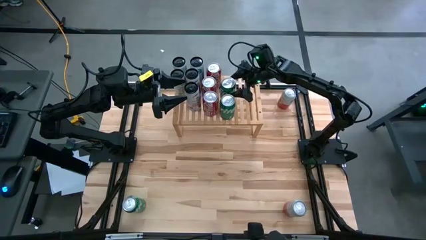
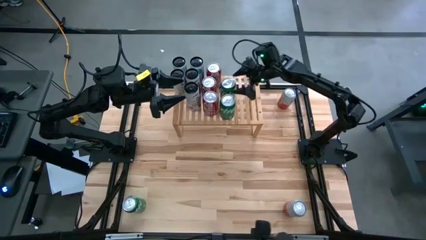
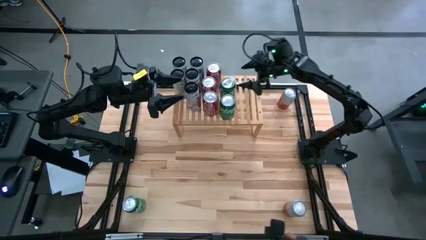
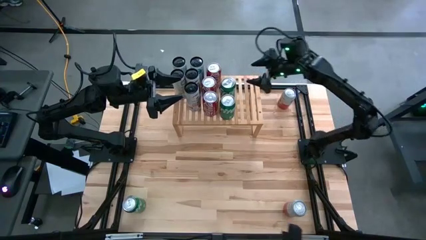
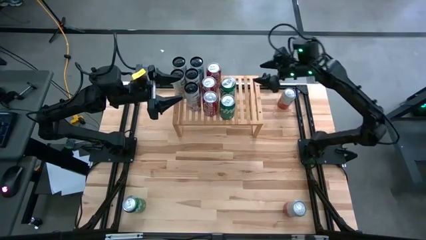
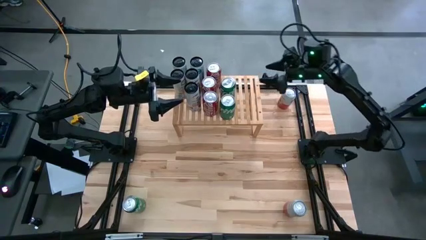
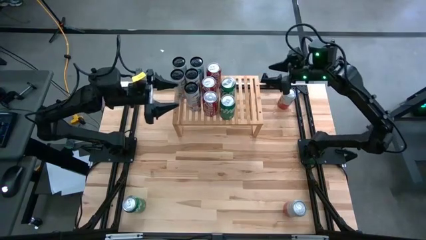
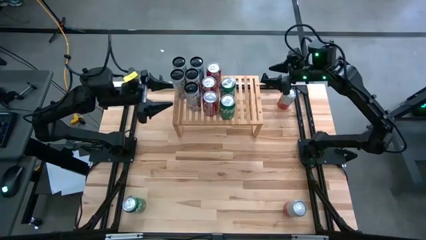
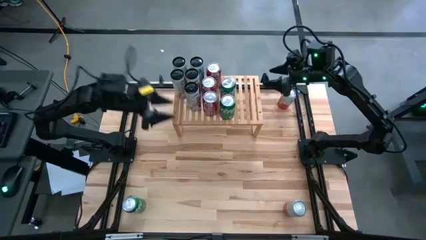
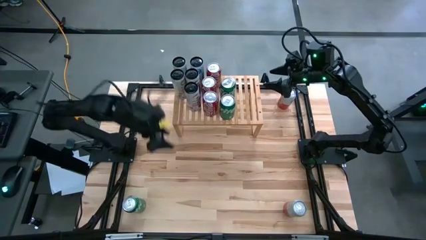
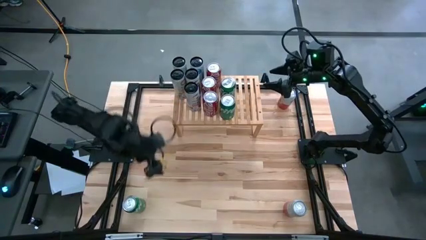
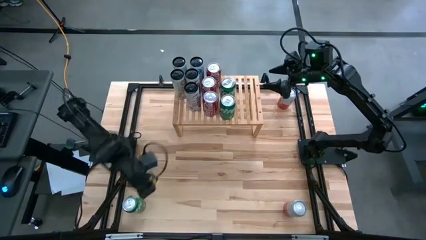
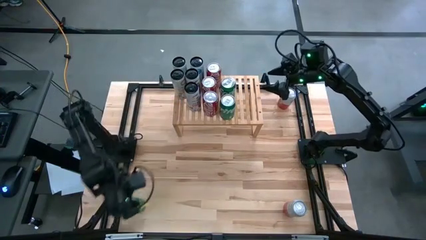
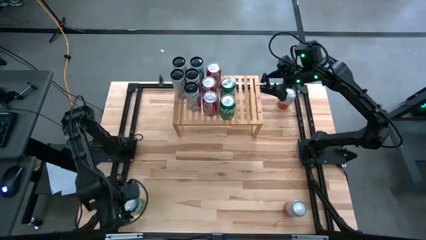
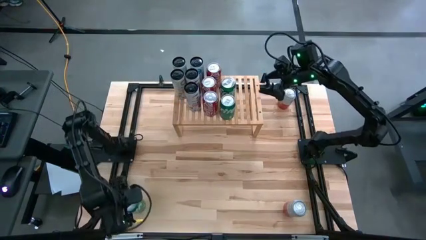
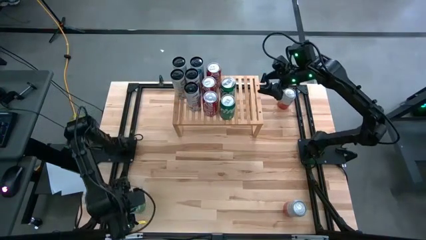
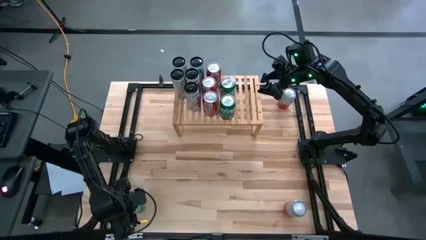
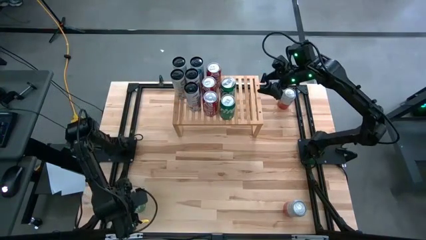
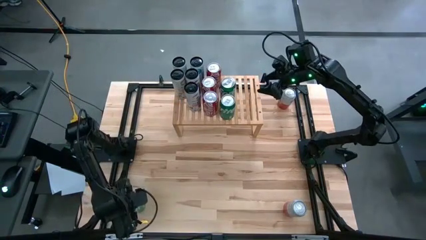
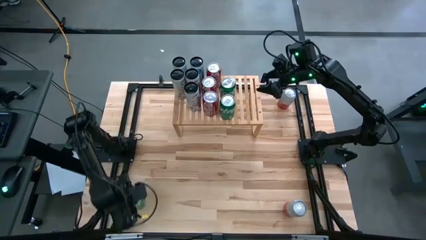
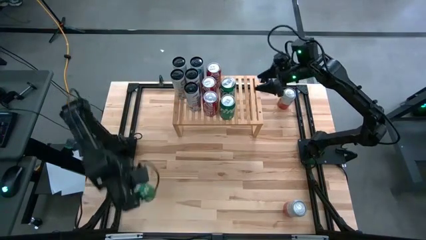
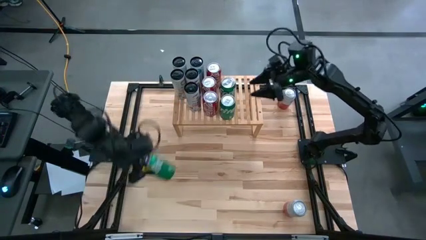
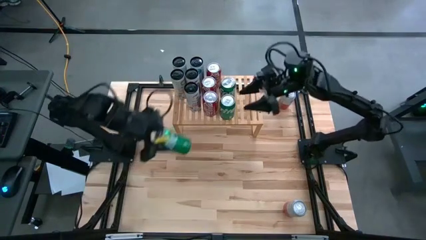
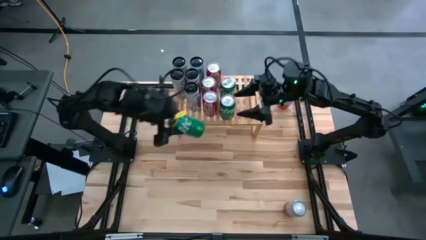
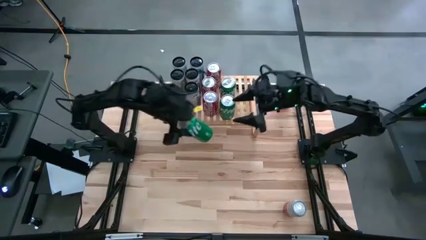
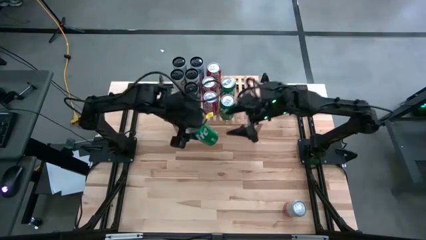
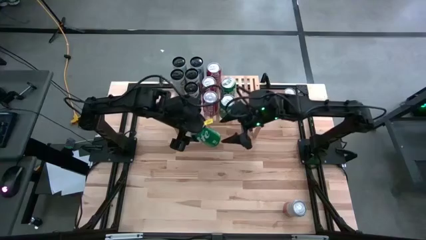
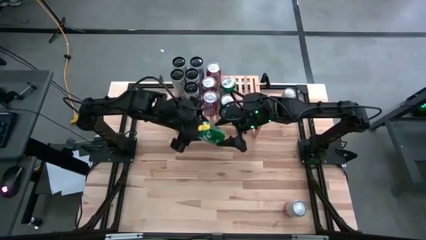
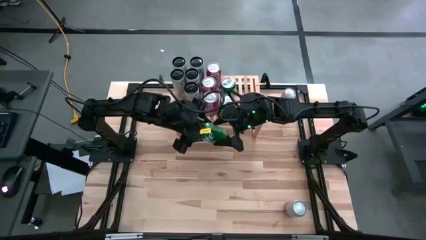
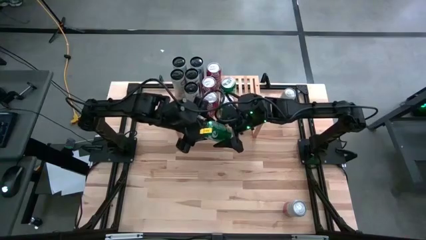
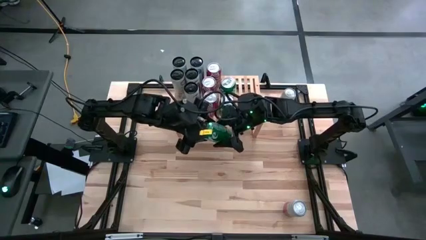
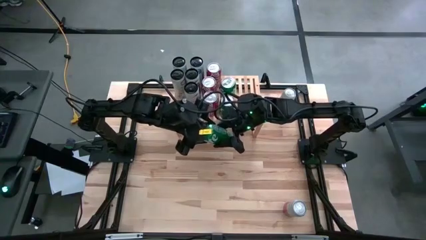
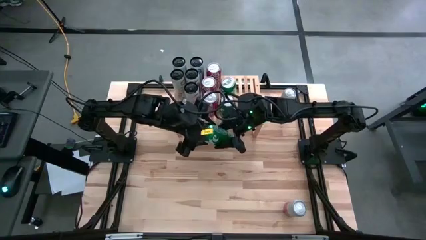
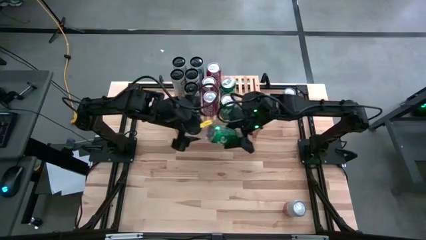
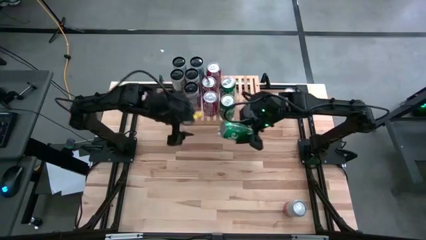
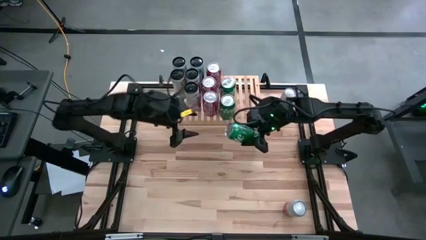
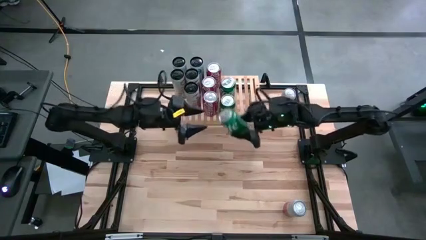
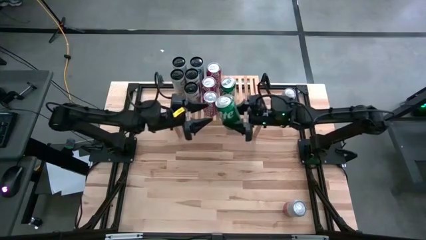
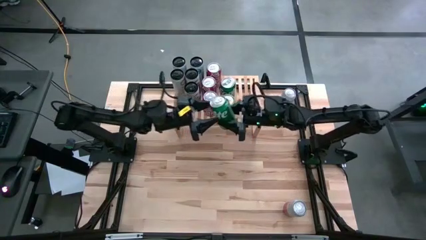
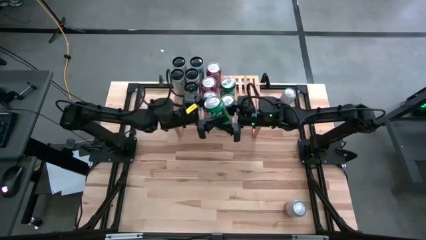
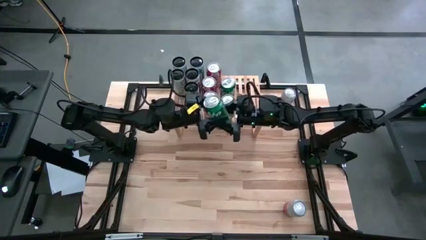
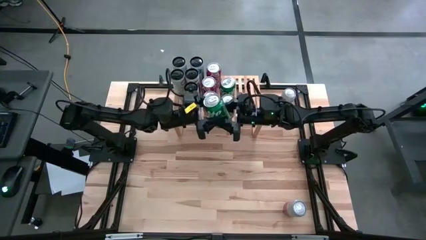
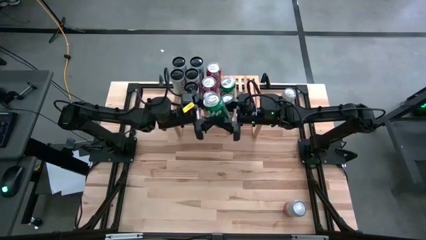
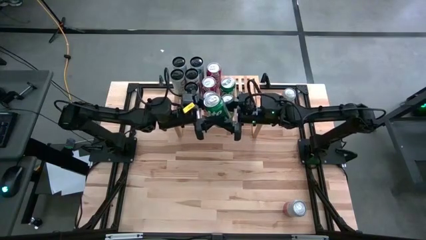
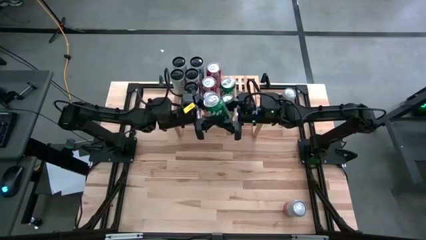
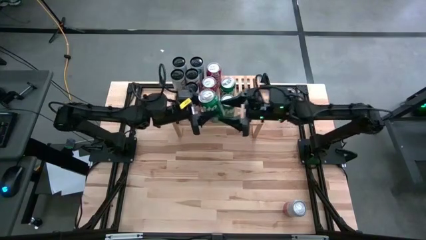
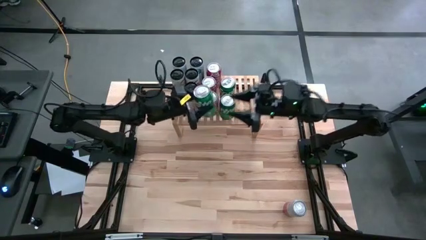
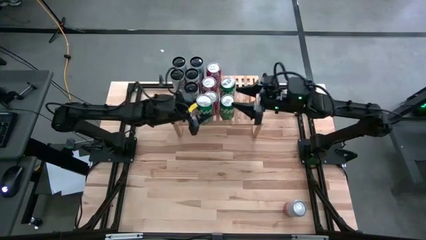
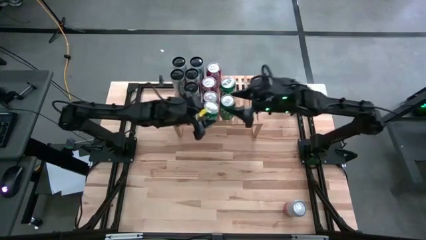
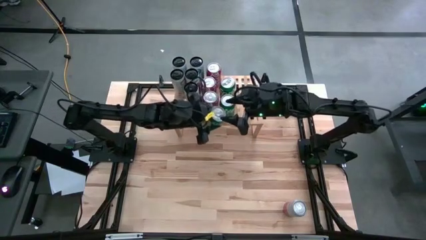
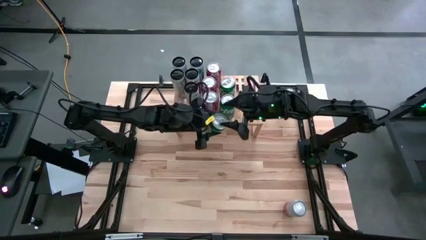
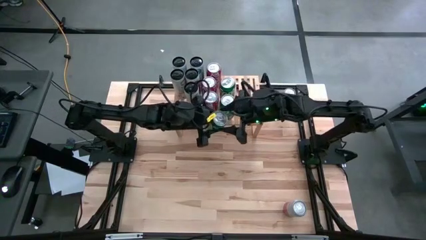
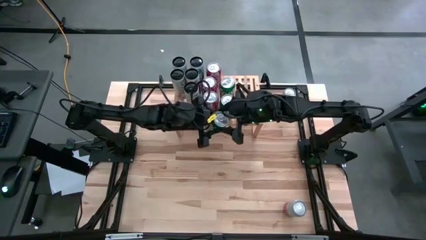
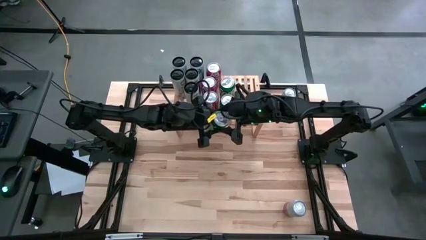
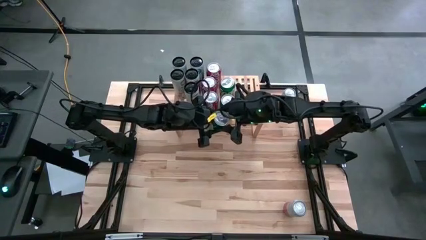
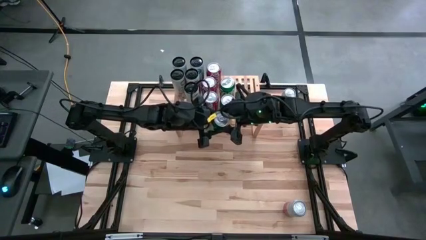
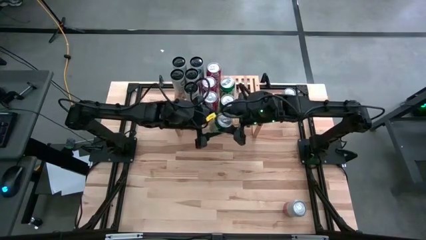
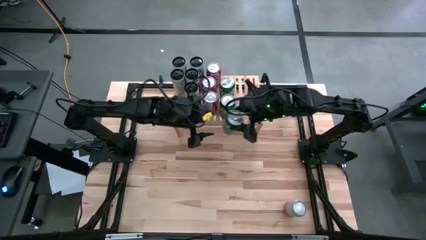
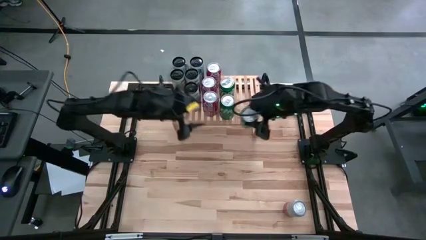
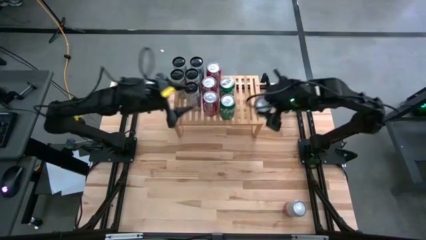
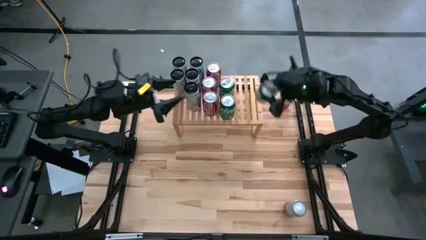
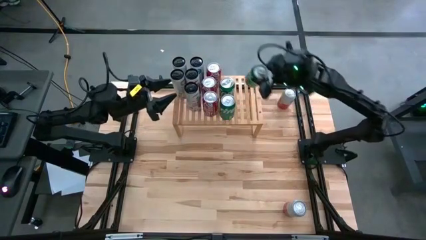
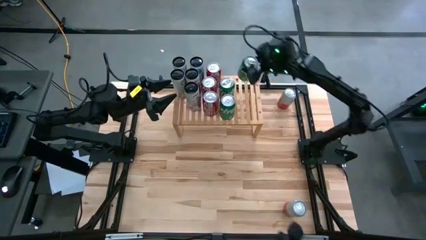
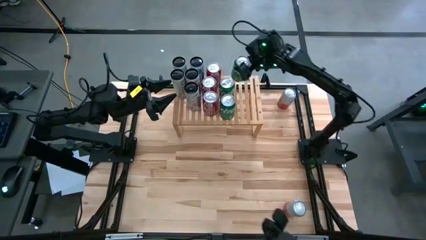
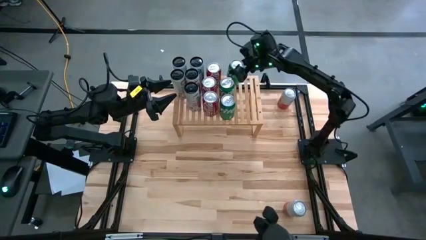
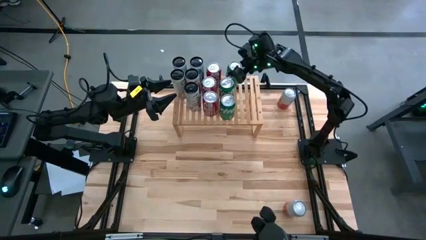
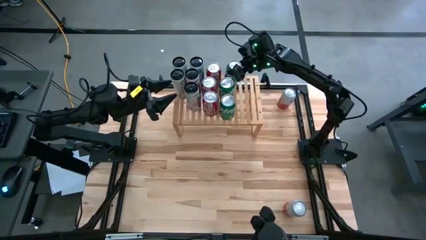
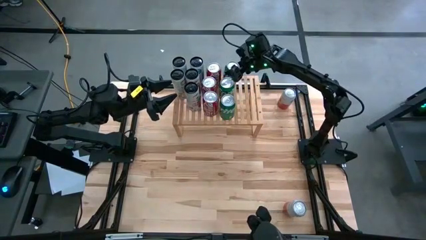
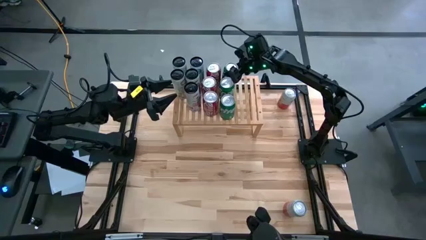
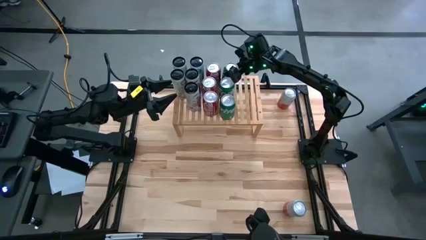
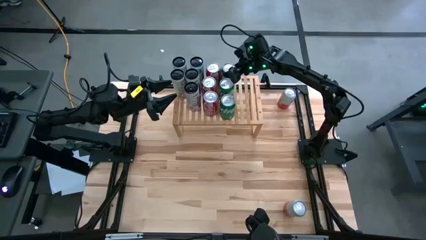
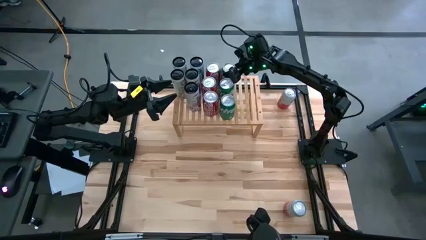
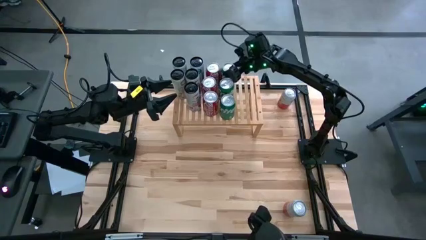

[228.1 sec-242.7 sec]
Task: Place canned beverage on shelf
Put the green soda can on the shelf aligned with other green soda can
